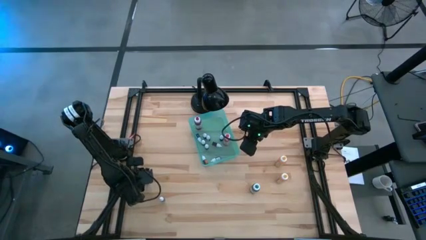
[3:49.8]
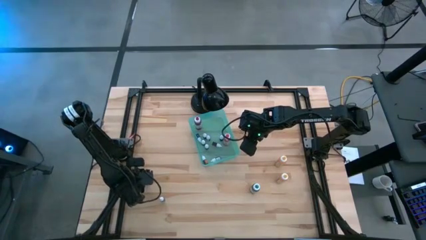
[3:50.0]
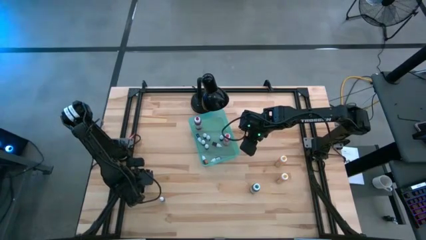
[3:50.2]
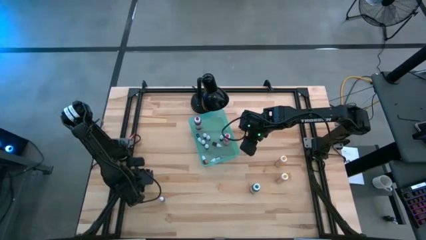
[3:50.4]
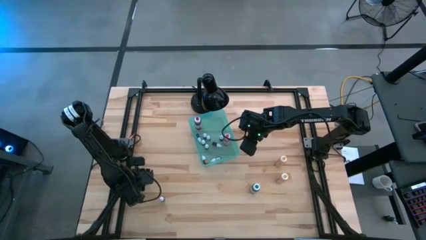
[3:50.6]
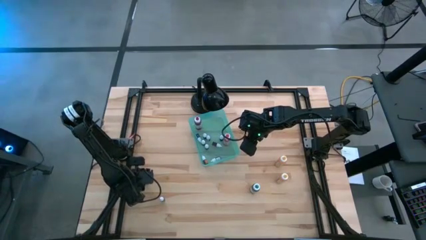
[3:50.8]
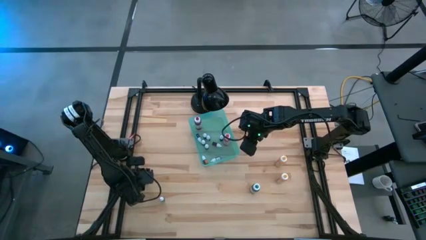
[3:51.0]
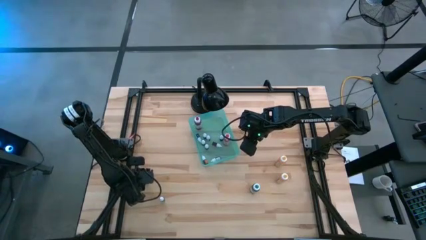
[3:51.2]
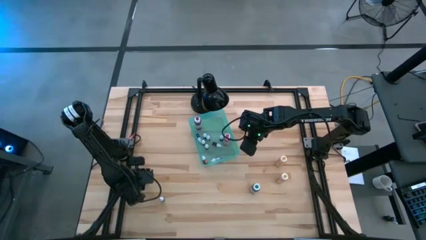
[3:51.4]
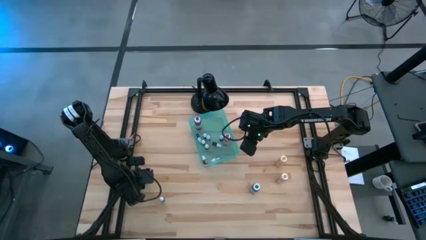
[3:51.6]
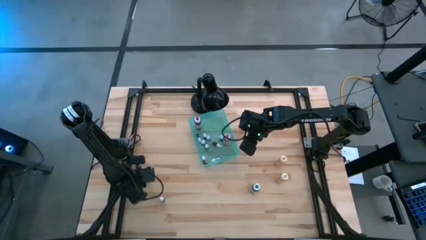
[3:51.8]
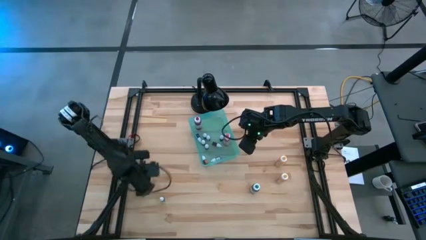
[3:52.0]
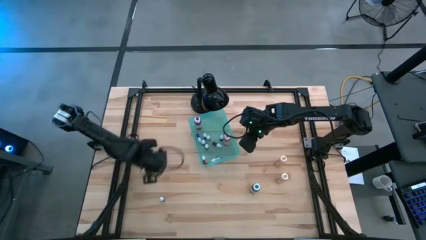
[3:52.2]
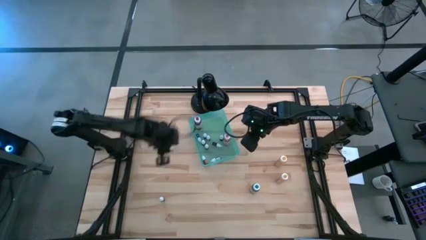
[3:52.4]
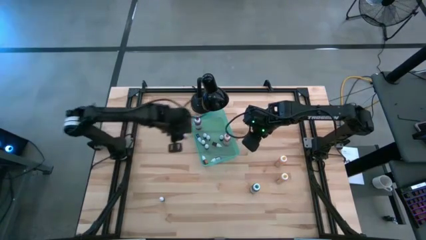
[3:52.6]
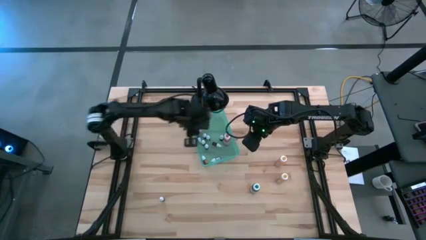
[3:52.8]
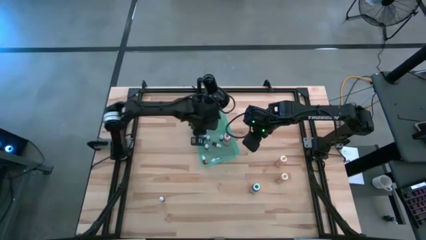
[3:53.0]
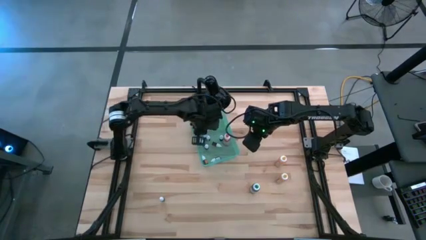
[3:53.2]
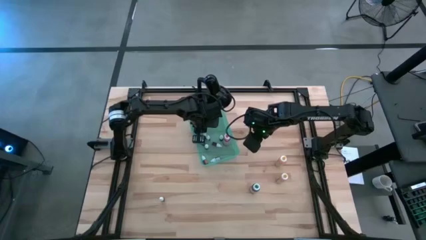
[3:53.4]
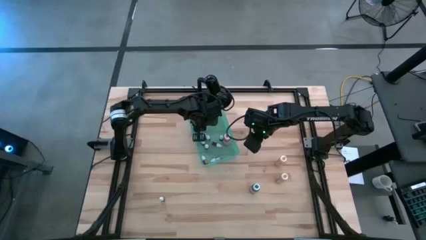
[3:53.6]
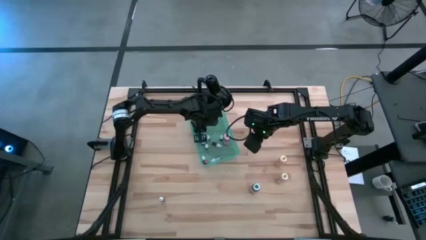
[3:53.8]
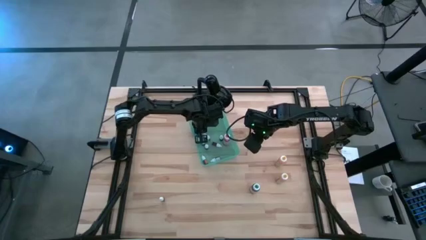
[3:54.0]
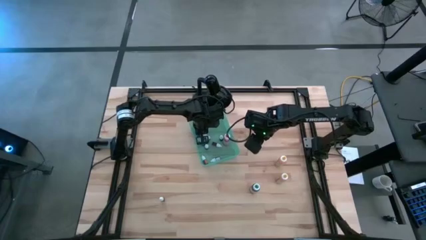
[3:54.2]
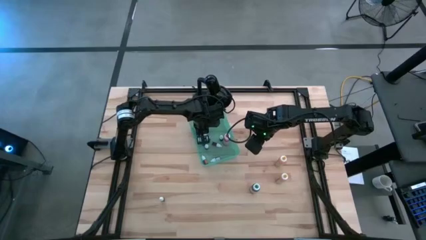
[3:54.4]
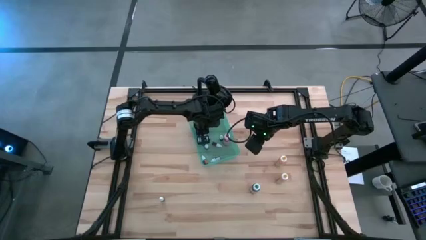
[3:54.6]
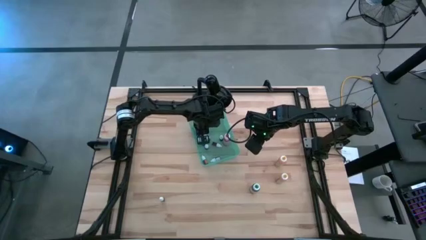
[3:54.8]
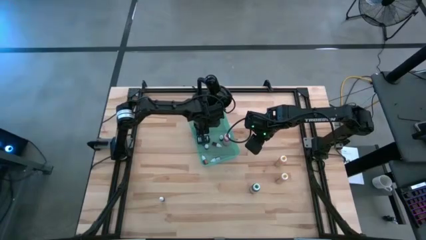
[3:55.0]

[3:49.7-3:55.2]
Task: Pick & Place food coloring
Put the small pink food coloring bottle into the green bin

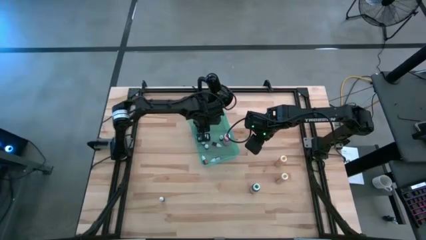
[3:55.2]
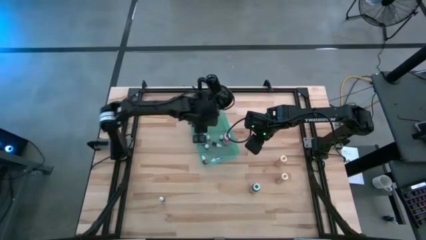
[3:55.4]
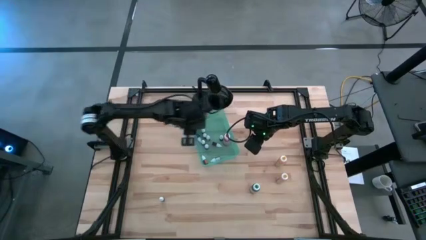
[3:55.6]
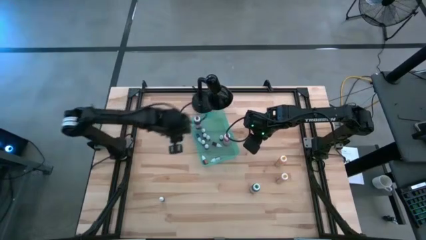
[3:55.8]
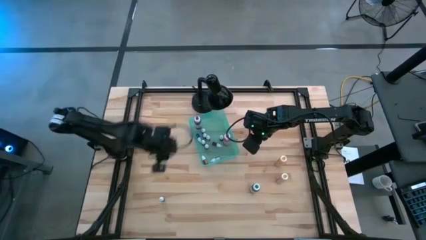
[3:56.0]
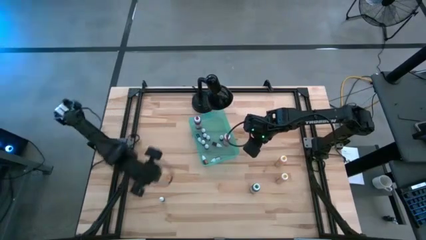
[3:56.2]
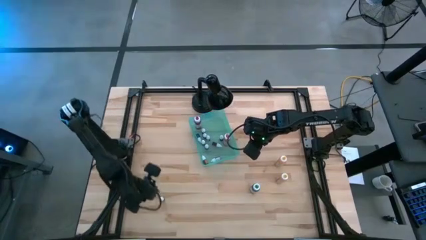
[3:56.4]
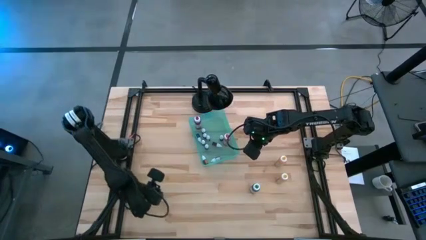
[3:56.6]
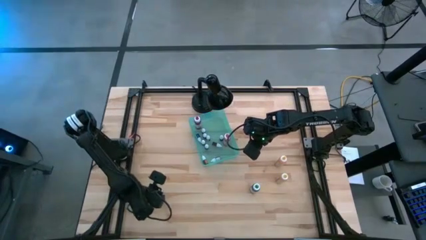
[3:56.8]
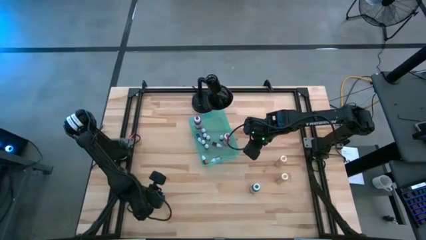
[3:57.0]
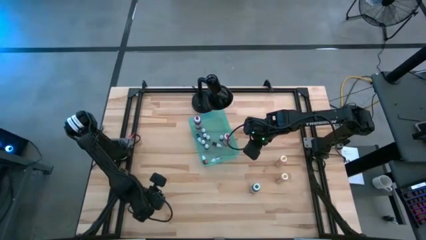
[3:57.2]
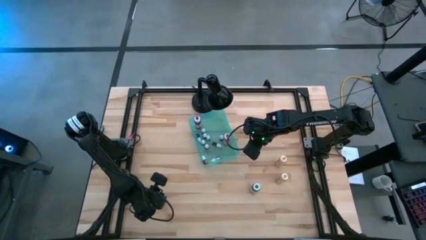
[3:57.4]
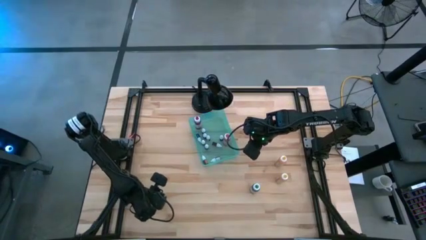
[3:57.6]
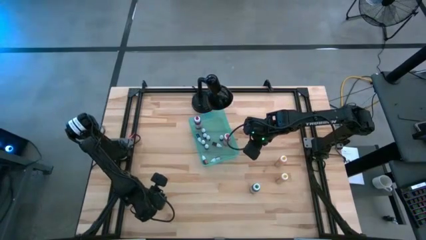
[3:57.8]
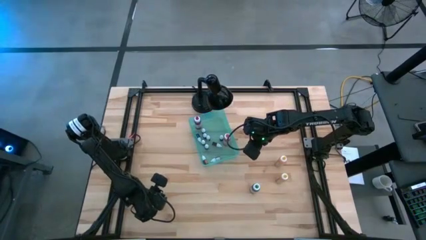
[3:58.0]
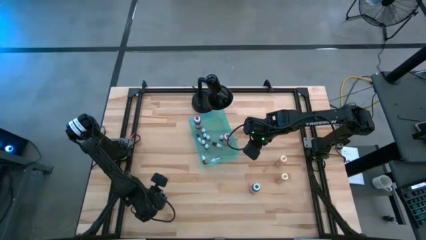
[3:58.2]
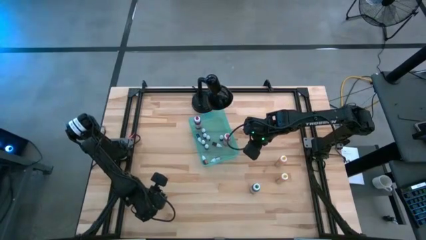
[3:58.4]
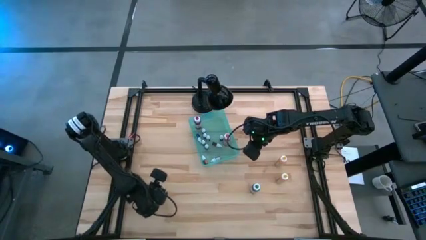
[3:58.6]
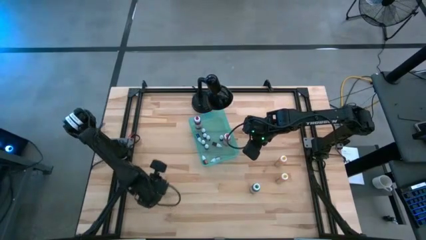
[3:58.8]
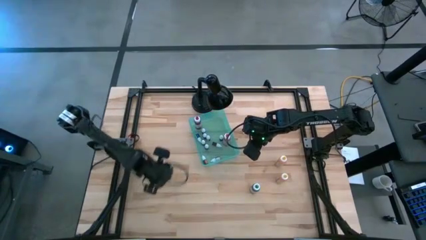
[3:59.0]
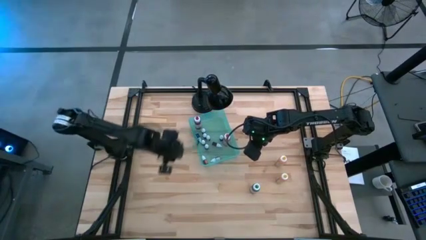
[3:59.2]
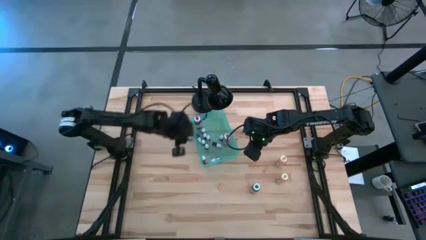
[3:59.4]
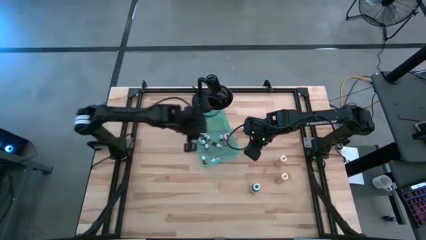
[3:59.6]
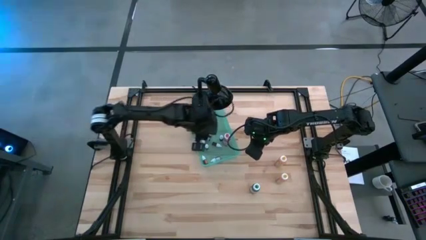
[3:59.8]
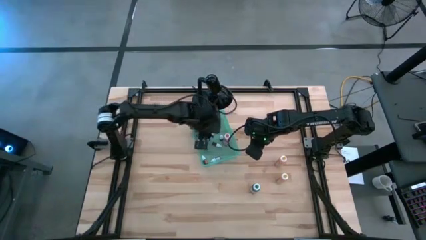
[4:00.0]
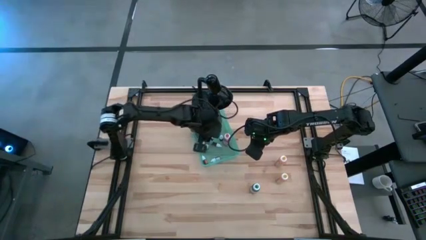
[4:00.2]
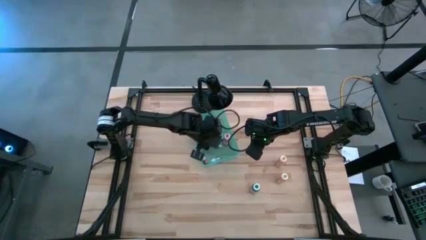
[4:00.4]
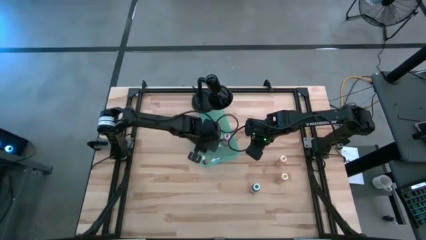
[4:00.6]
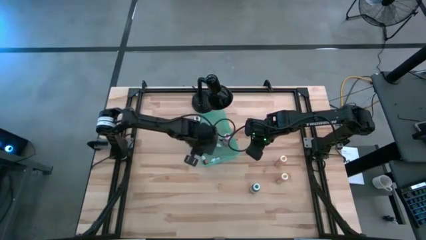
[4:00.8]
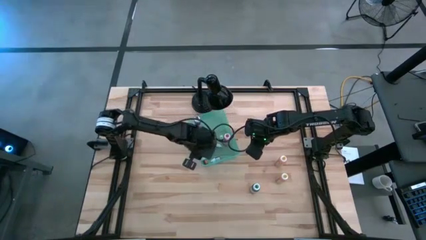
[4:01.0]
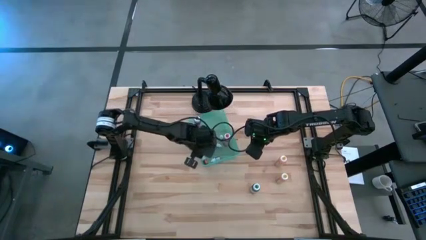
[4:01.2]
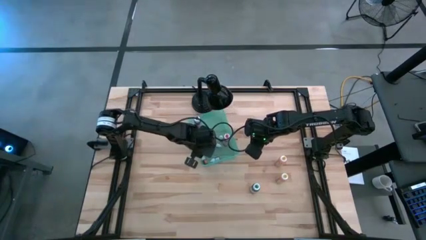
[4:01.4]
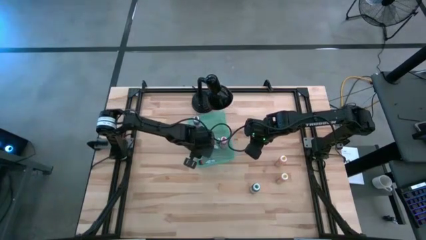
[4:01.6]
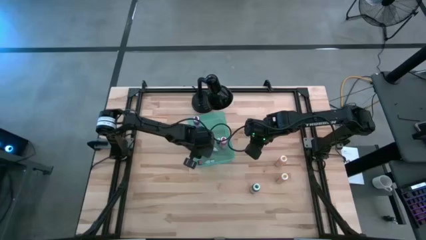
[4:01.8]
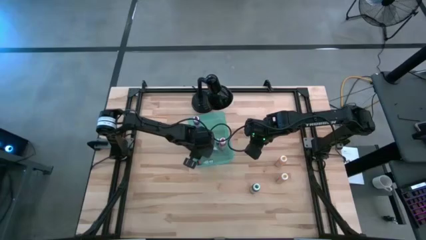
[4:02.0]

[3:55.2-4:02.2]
Put the small green food coloring bottle into the green bin

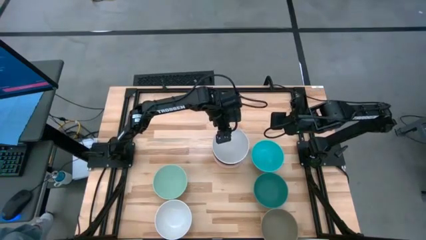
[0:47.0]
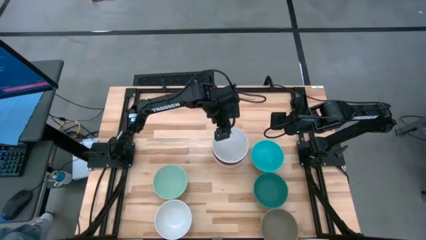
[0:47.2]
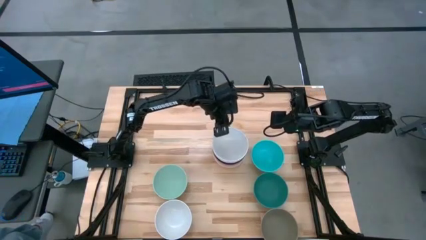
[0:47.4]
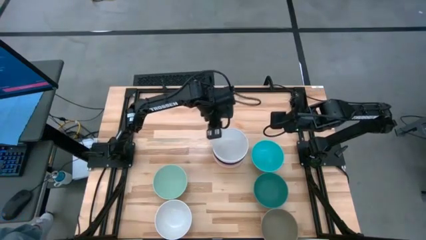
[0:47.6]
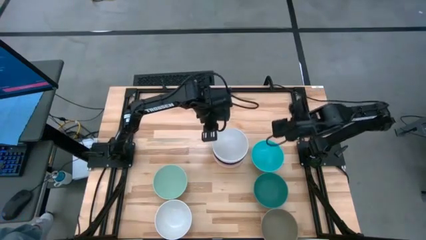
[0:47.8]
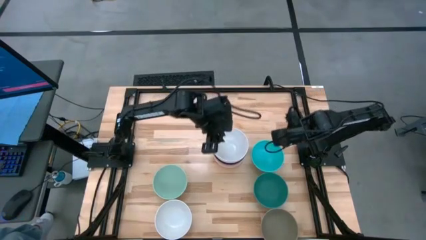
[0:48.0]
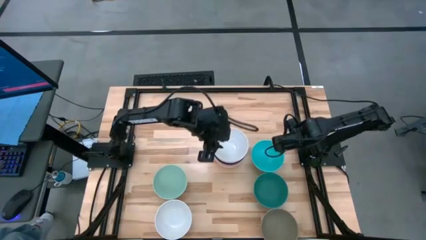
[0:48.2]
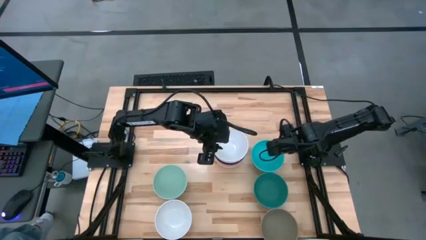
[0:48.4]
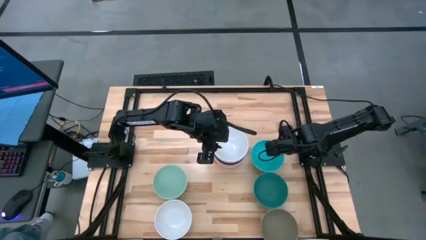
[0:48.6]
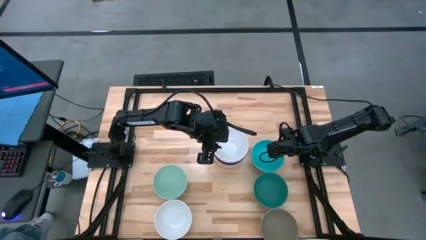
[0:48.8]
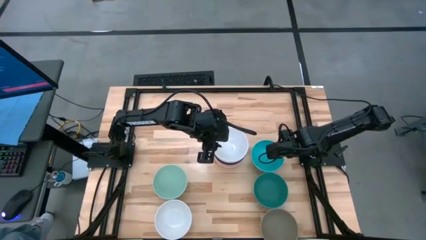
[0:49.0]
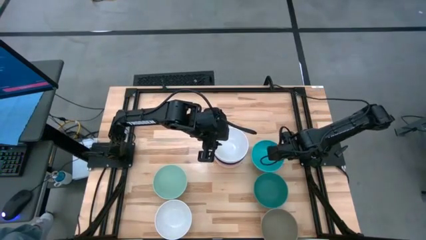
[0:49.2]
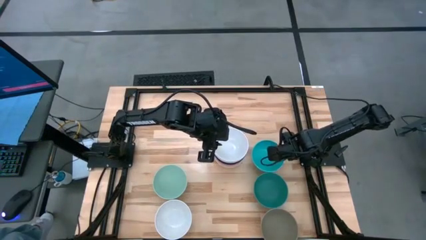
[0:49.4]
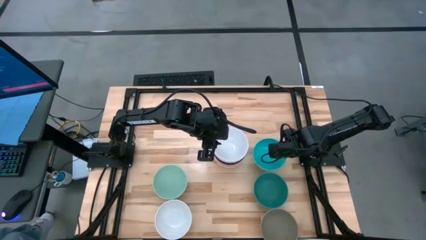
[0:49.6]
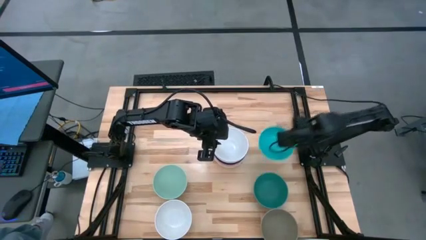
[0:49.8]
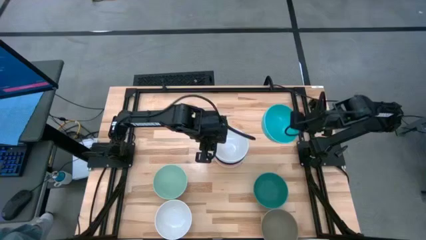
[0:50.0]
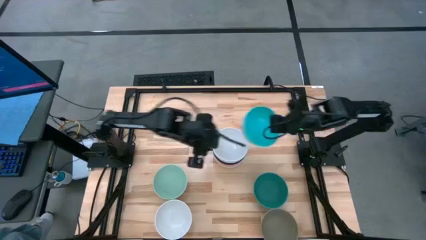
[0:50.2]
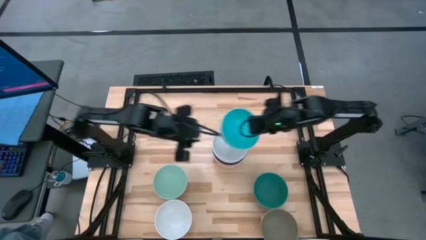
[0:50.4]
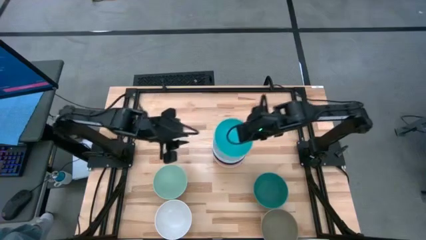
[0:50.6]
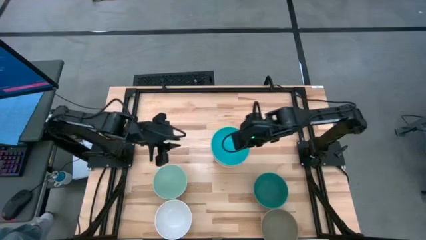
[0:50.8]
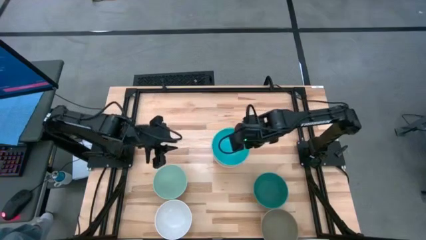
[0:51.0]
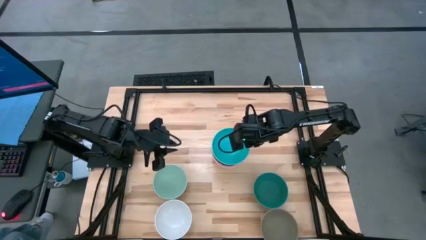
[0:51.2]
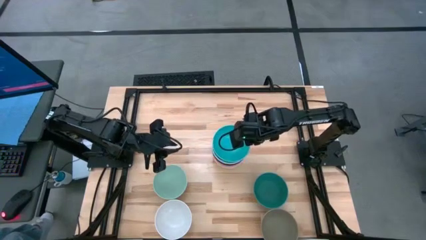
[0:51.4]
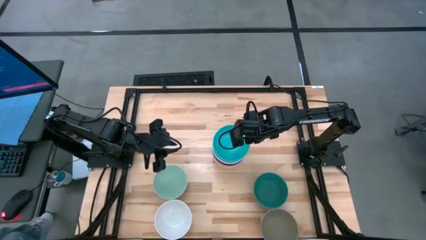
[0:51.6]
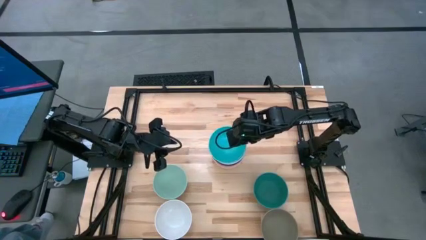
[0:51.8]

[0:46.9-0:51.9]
Task: Nest bowls inside each other
Stack the light blue bowl on the white bowl
